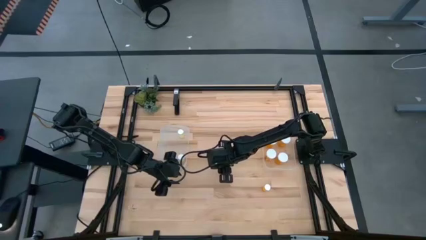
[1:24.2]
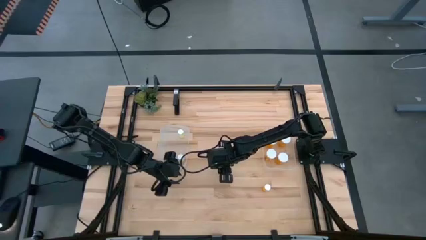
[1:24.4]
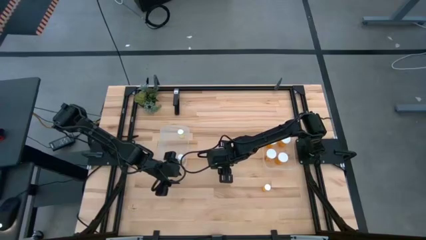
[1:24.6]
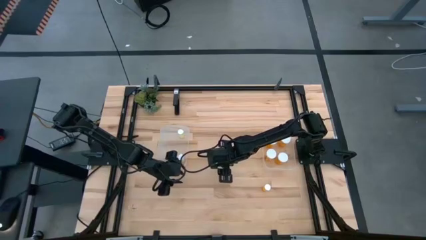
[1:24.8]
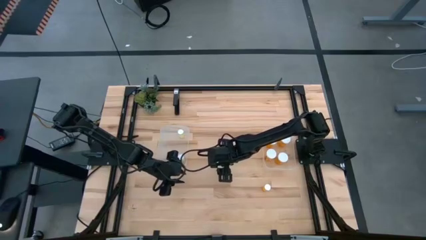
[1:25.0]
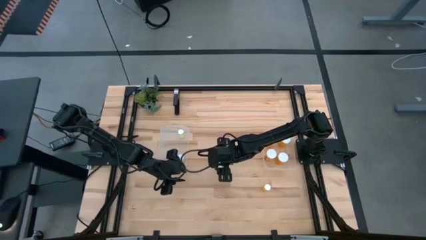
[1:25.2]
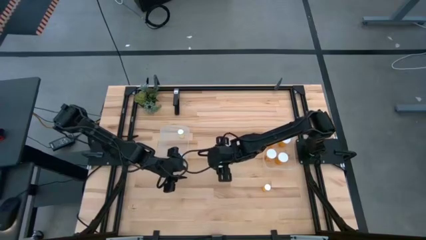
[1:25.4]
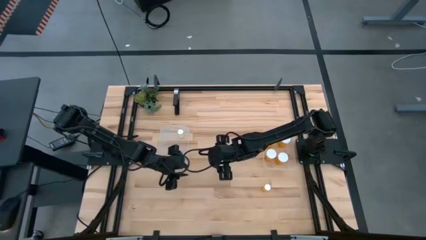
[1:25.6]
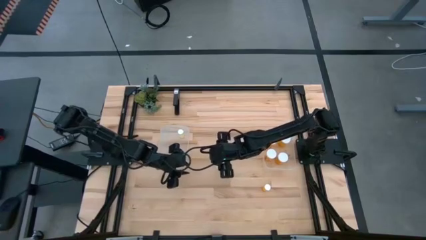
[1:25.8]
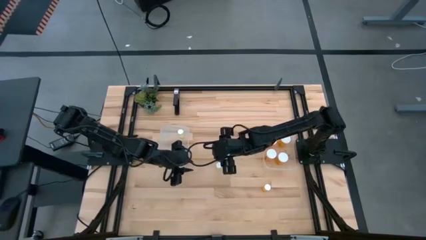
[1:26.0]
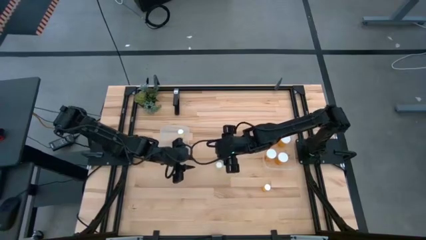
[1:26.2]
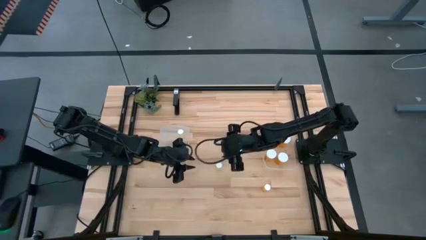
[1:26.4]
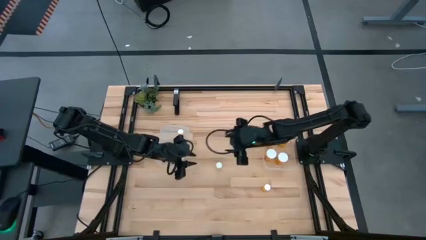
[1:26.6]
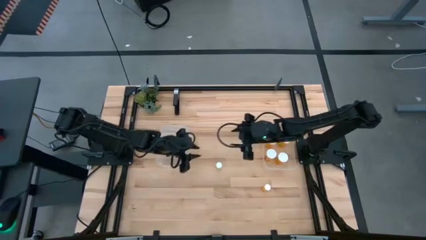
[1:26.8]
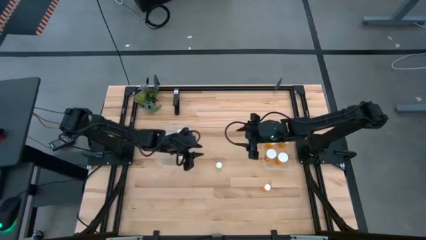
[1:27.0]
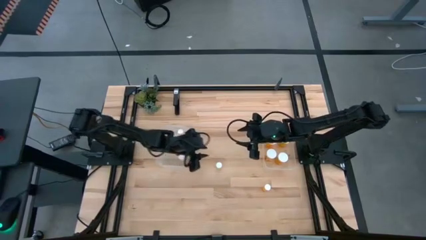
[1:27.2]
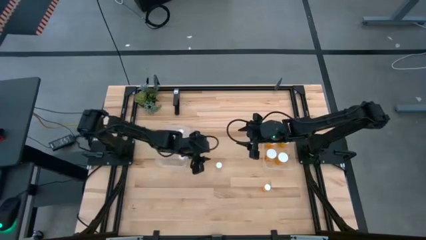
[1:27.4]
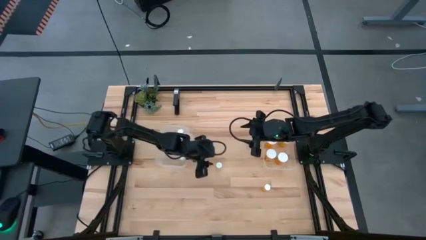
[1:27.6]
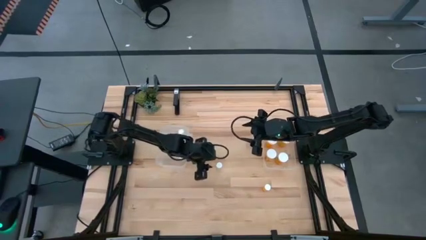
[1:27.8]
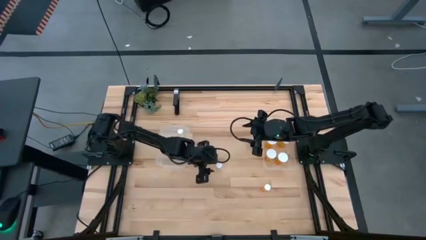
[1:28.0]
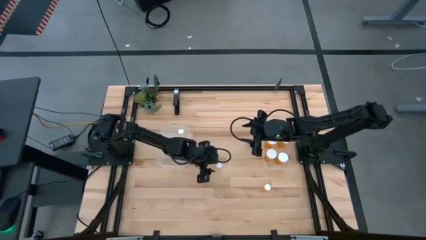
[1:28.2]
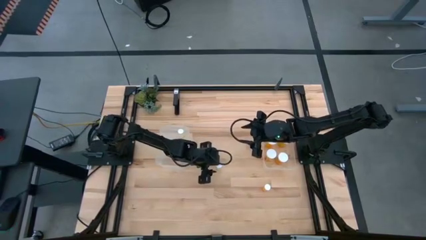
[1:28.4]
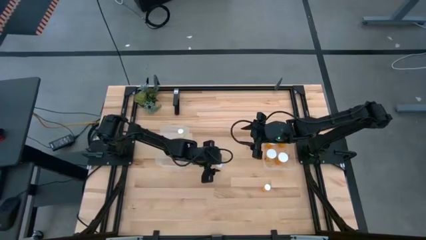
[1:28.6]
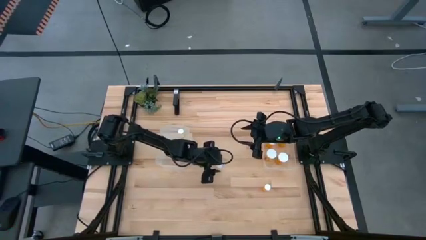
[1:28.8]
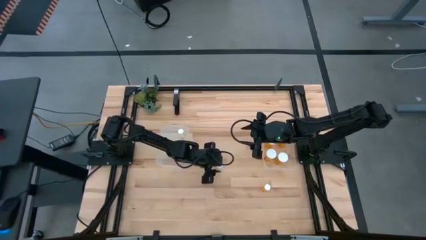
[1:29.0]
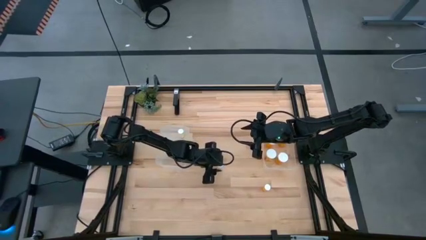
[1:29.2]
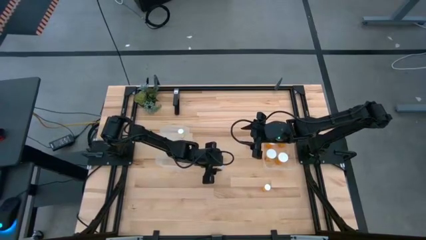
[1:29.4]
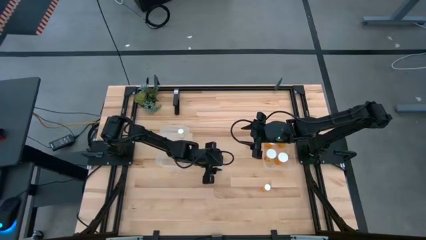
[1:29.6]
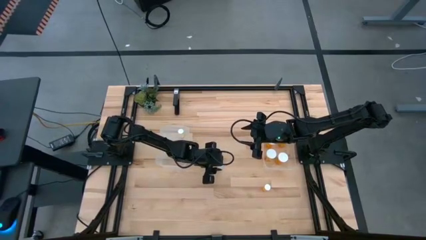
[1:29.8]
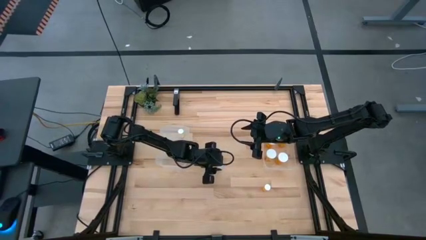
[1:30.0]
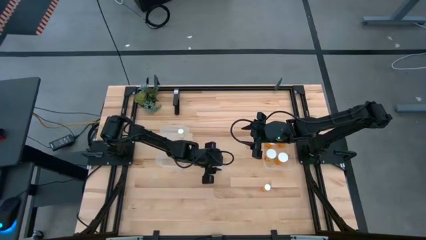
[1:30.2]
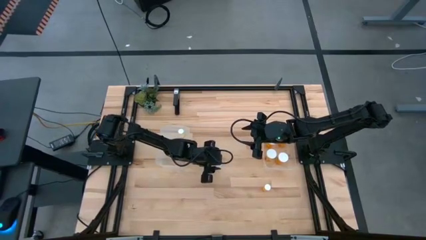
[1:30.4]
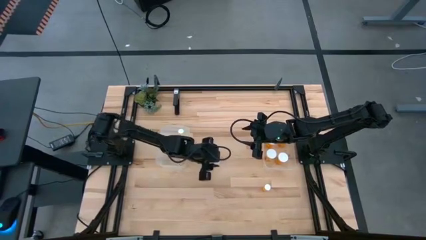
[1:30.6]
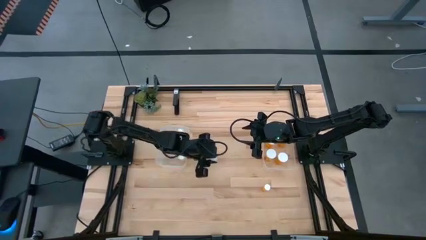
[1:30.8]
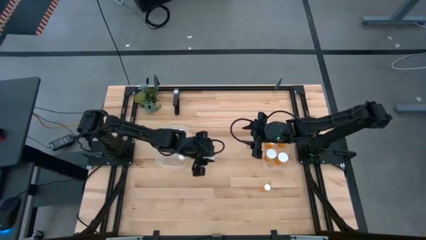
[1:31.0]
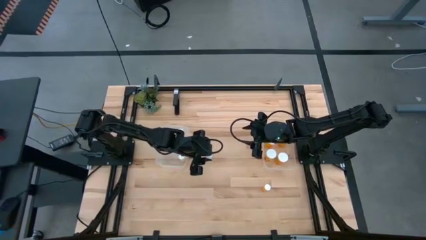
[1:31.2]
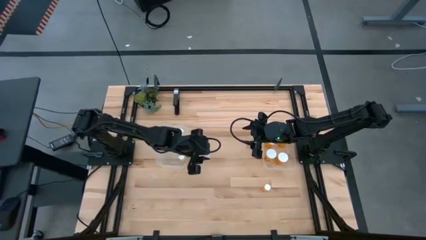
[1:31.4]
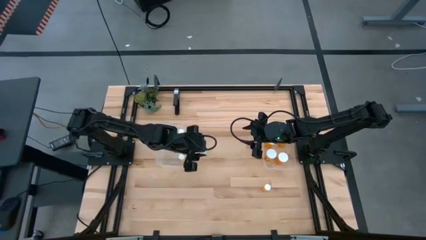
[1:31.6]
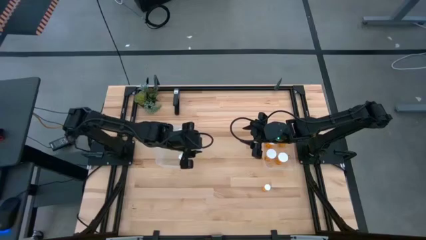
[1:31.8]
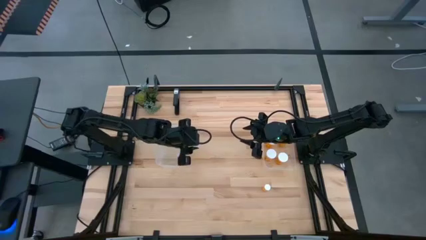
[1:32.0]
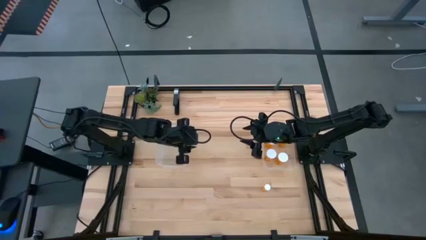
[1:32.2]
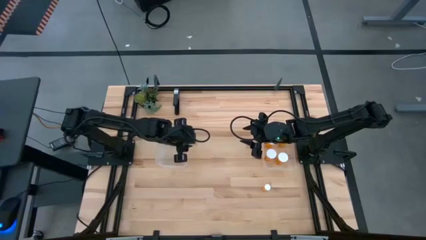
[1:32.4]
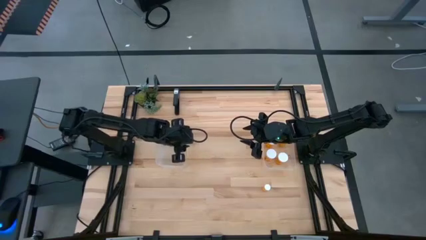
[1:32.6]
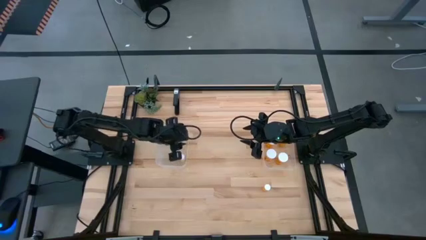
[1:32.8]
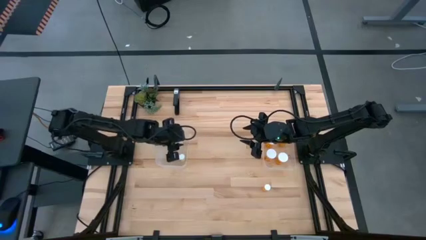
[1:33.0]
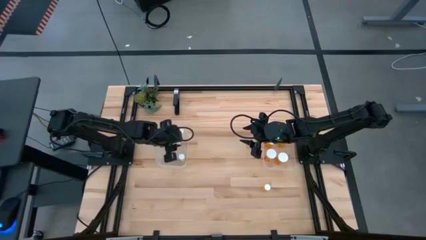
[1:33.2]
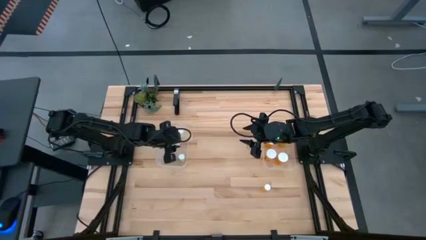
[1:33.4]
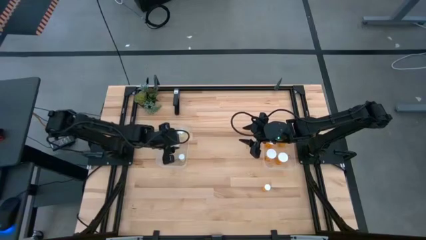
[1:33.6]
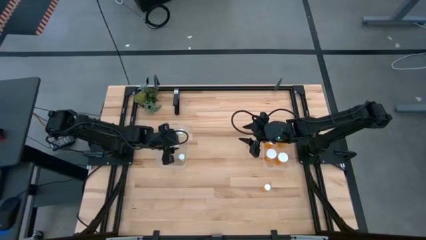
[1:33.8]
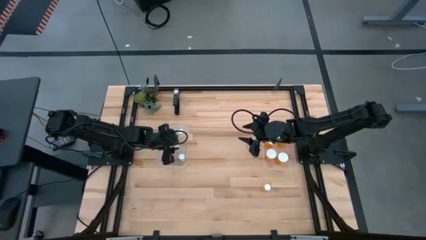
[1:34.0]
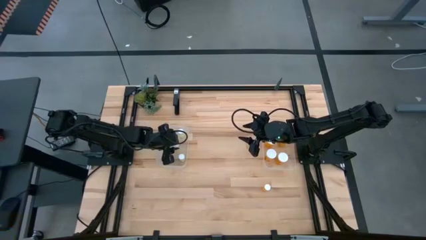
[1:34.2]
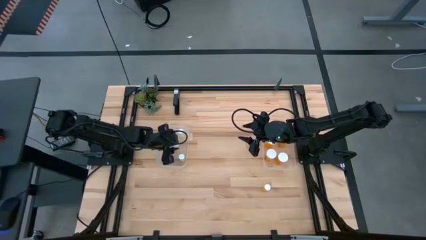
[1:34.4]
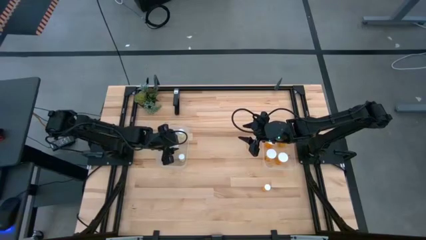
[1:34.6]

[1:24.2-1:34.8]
Task: Pick and place medicine bottles into bin by pill shape (circle, oval)
Put the yellow pill bottle into the left transparent bin

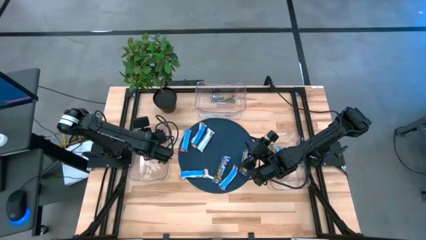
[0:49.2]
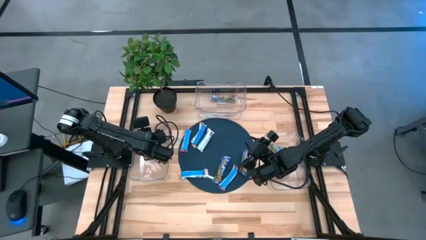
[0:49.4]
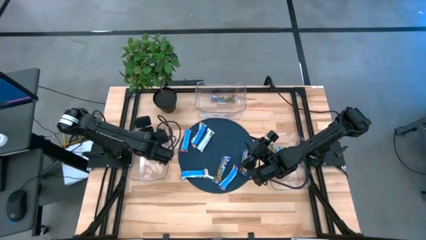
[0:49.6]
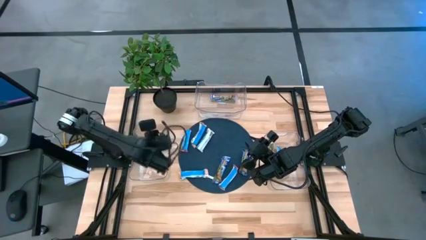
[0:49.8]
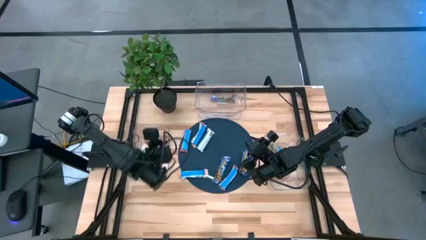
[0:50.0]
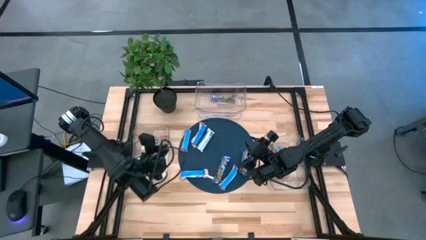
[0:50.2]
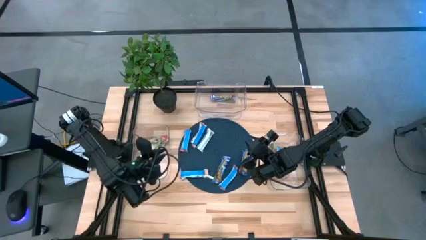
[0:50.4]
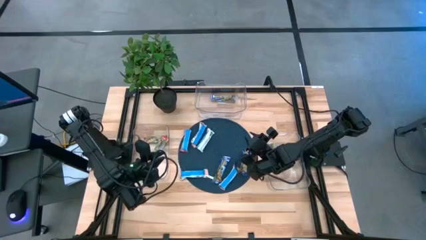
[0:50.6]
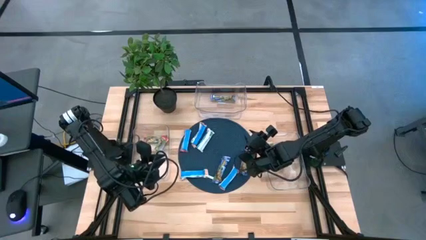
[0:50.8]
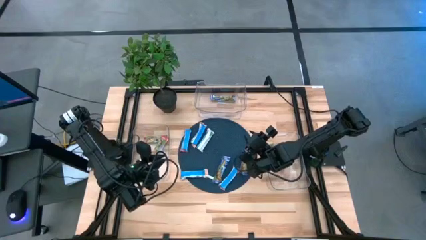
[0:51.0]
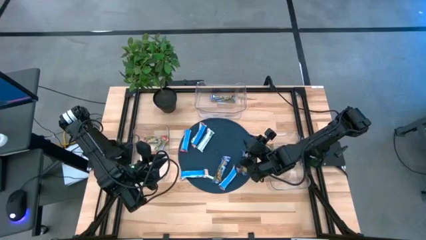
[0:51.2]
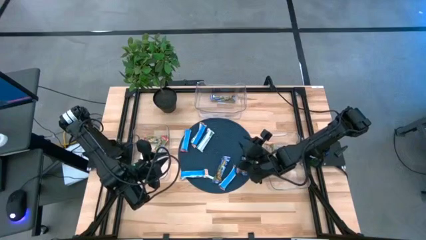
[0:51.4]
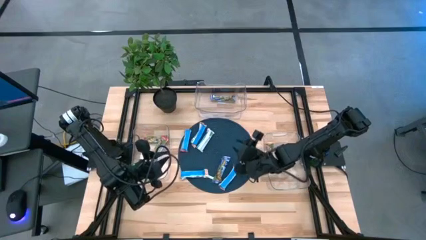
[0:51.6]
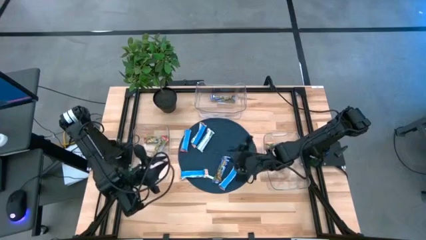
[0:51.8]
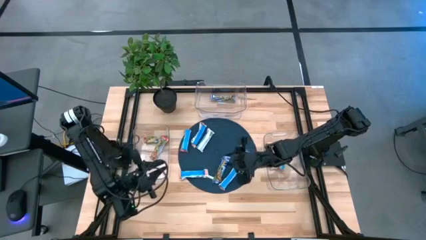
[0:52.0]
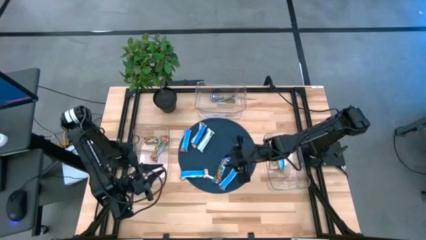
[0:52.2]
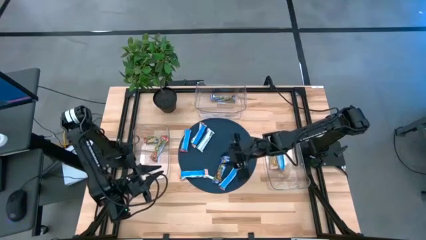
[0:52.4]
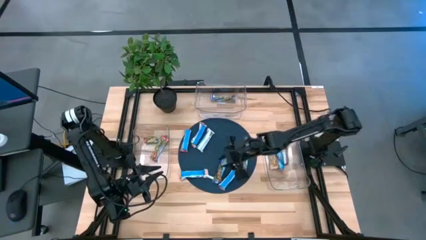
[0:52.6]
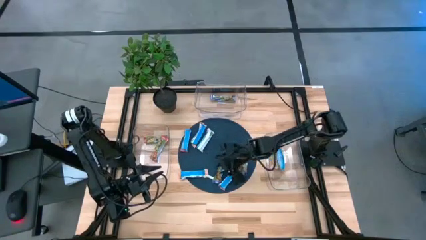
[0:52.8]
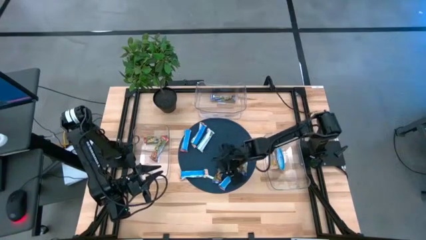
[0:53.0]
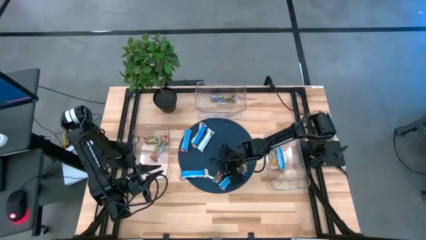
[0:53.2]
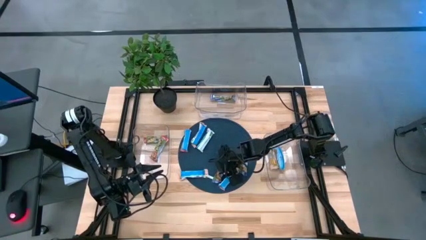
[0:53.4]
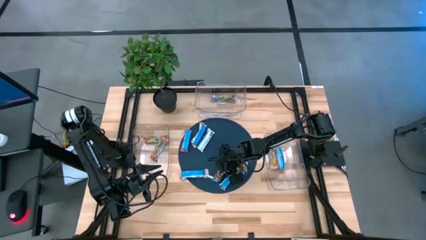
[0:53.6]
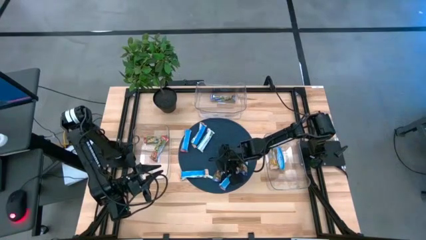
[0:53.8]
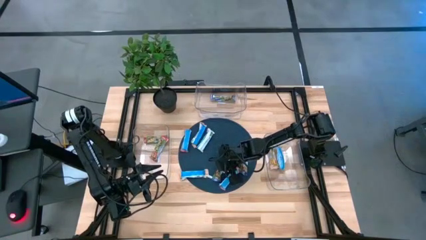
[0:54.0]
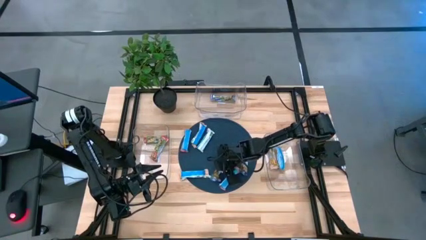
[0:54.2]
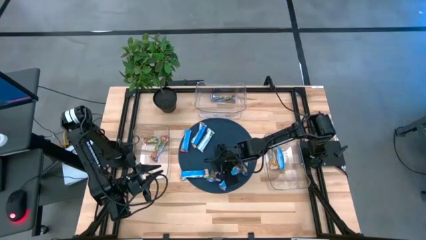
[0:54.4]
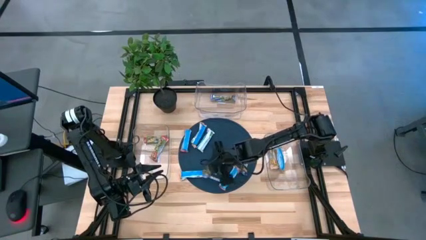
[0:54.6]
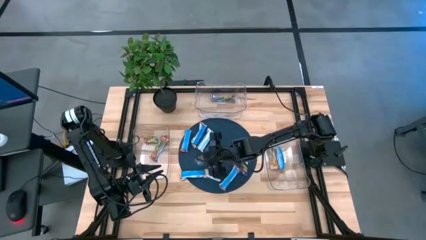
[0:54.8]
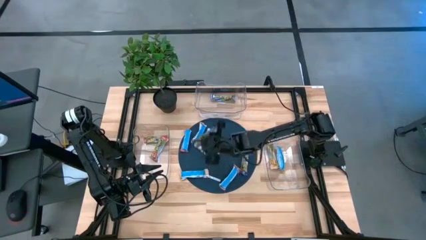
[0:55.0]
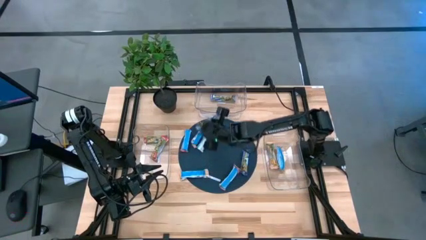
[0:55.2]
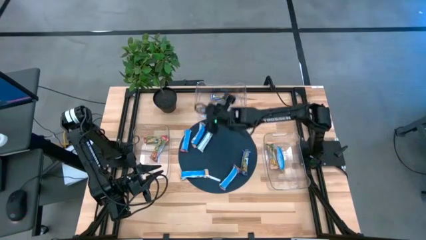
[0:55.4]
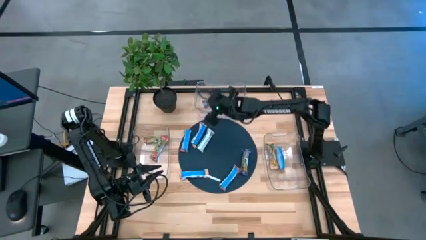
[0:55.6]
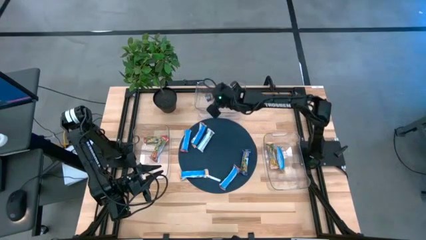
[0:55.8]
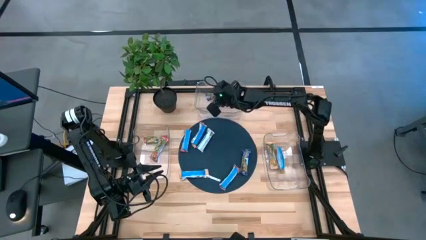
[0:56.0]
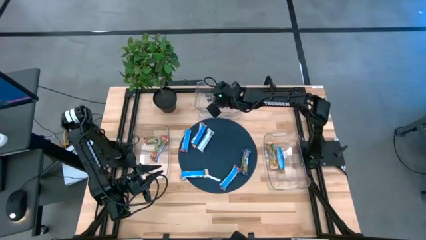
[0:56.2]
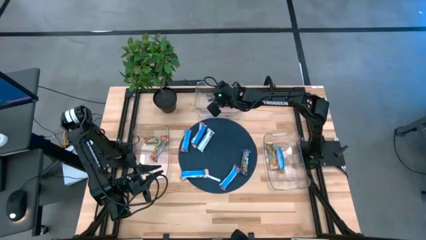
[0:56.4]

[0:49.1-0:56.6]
Task: Pick and place Granola Bars by type
Put the left blue granola bar into the top transparent bin
